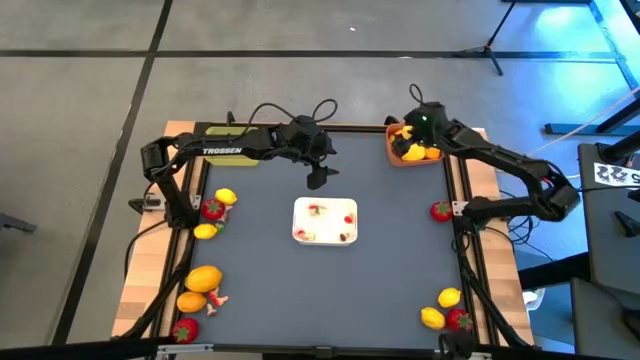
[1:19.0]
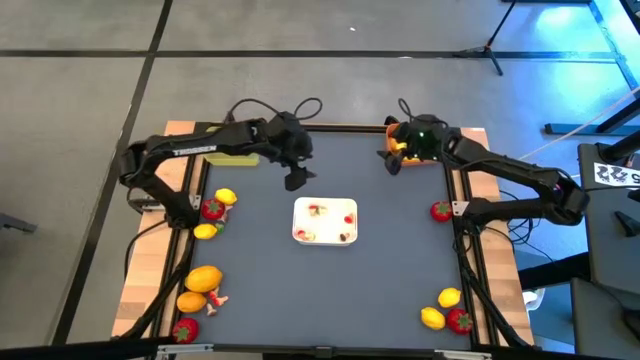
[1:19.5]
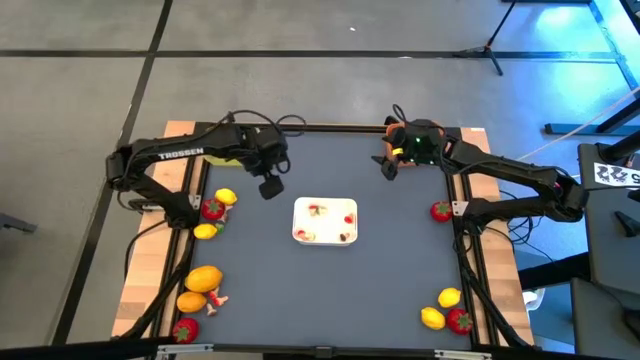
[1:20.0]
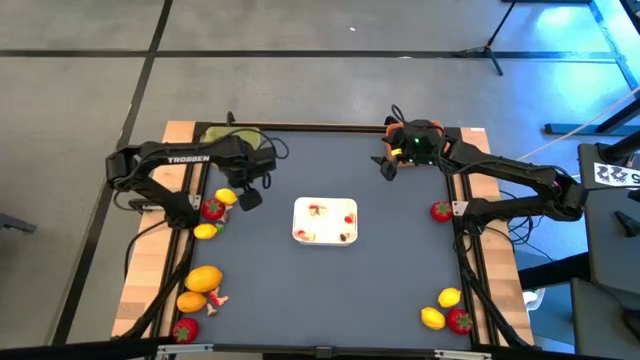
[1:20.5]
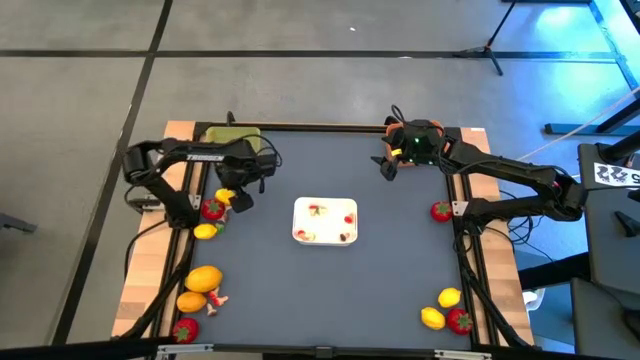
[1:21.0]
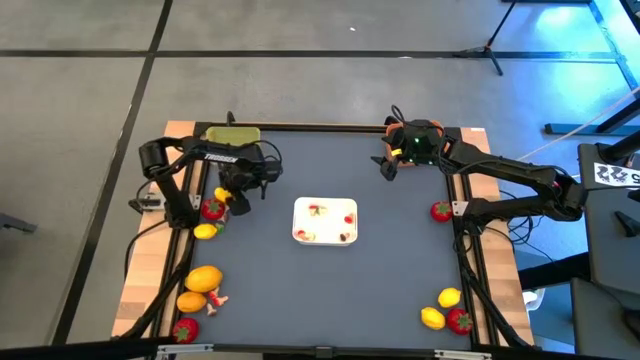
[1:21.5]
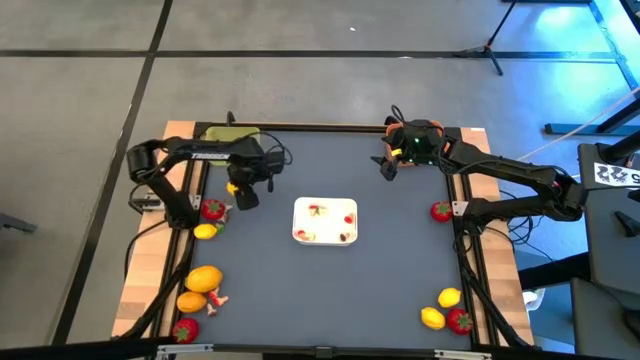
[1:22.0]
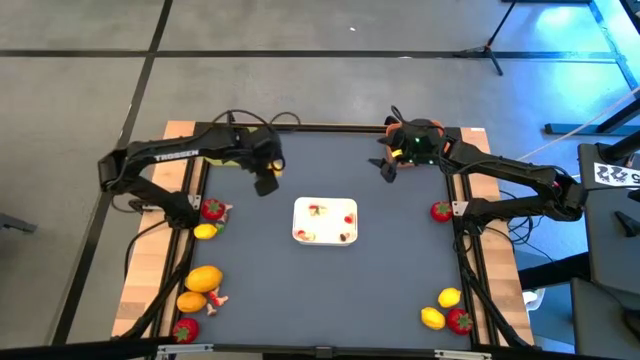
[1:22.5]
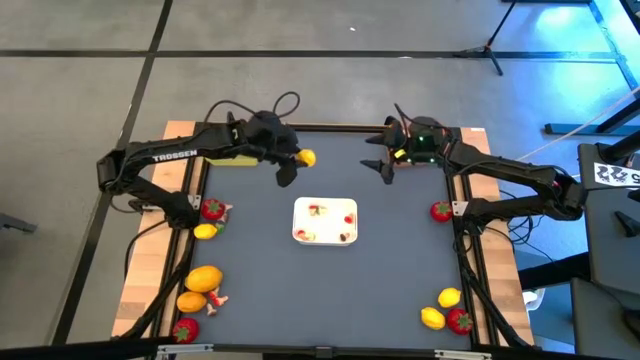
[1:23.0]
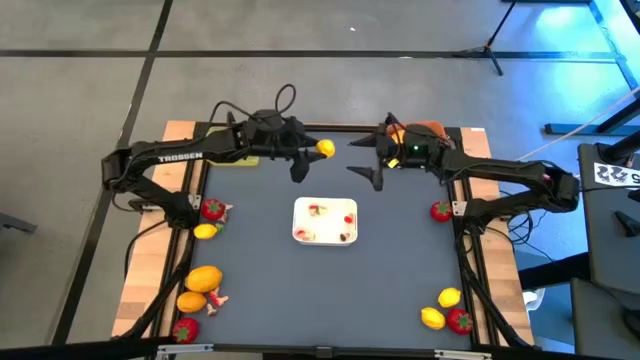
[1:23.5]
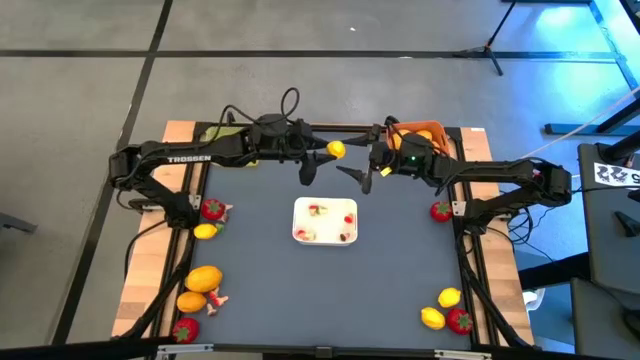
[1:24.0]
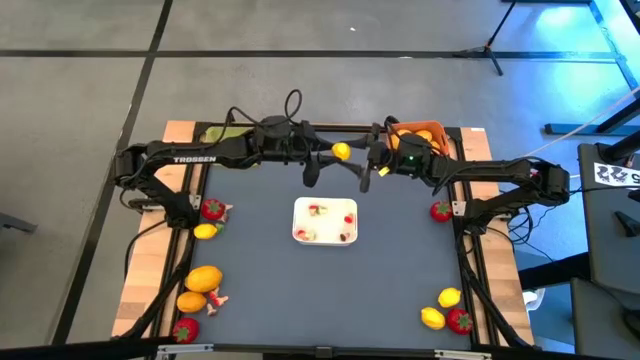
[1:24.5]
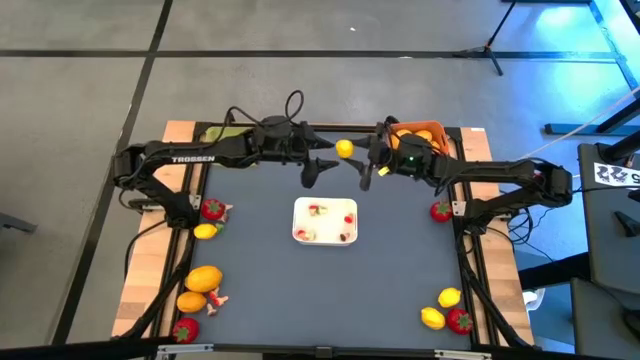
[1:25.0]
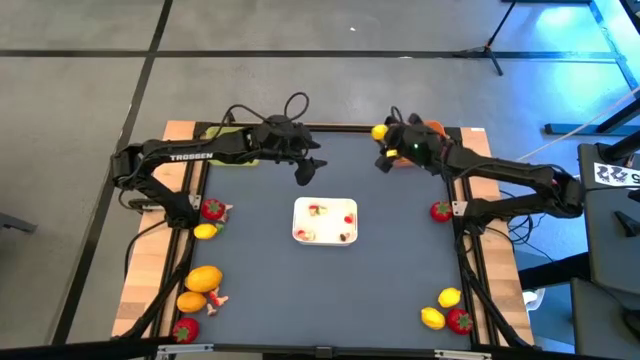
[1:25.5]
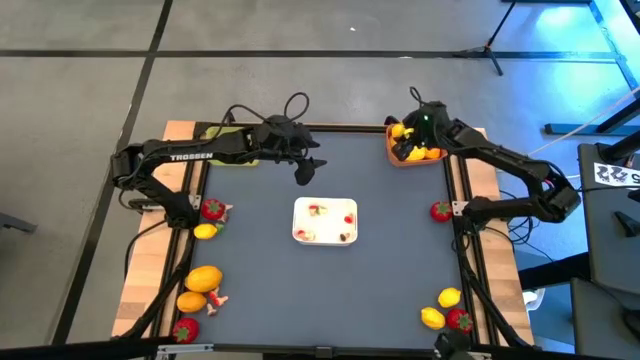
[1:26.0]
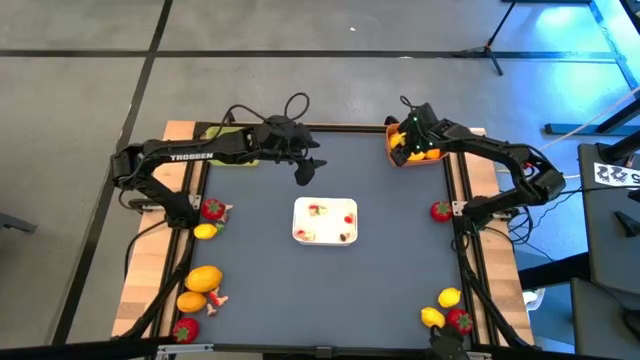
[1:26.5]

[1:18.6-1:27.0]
Task: Sort produce into baskets
Put the yellow lemon into the orange bin

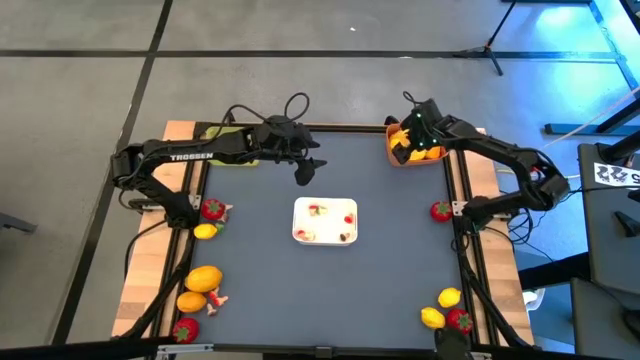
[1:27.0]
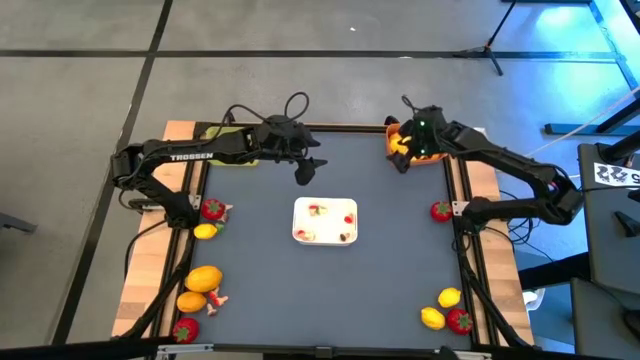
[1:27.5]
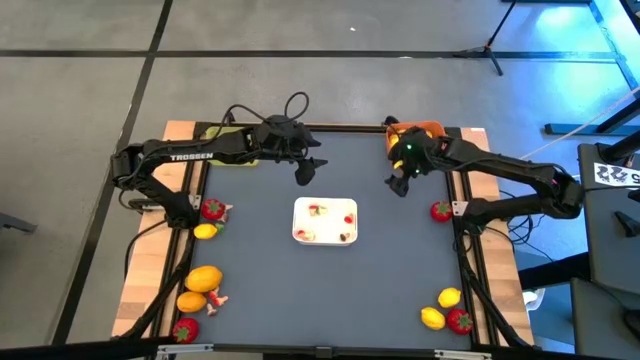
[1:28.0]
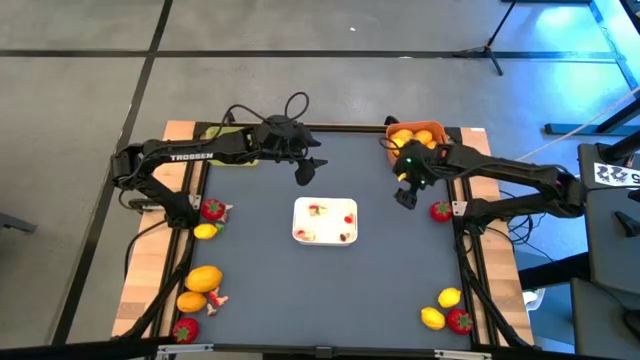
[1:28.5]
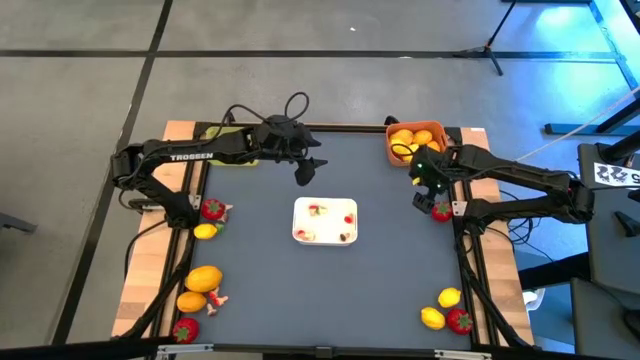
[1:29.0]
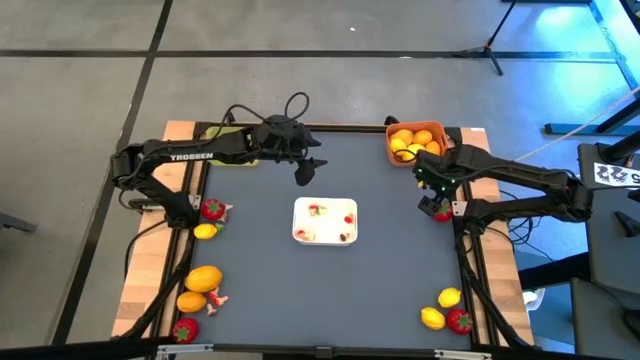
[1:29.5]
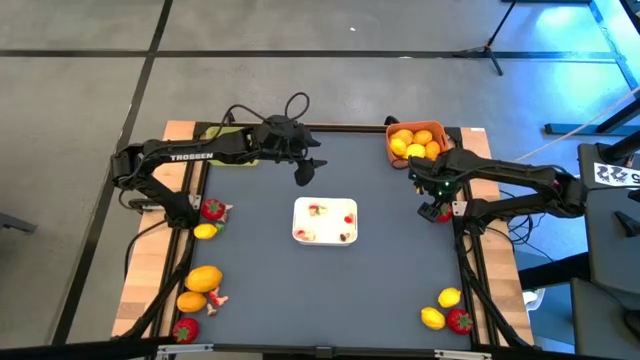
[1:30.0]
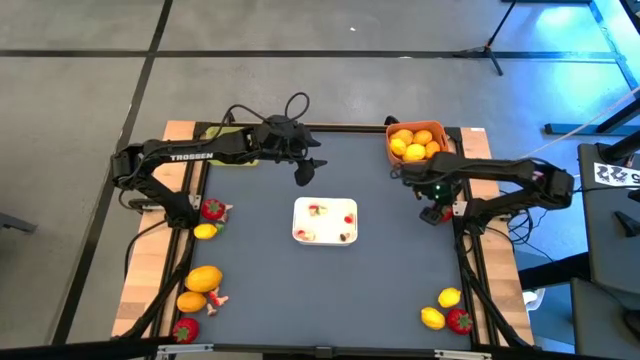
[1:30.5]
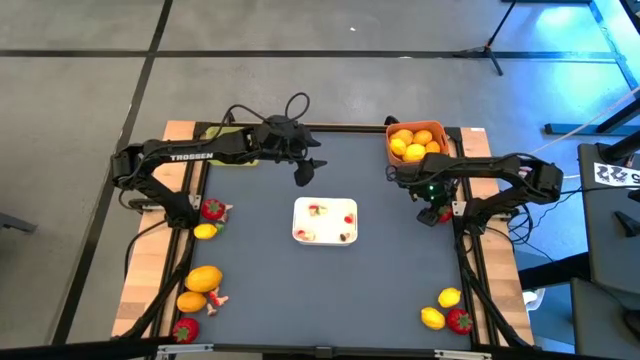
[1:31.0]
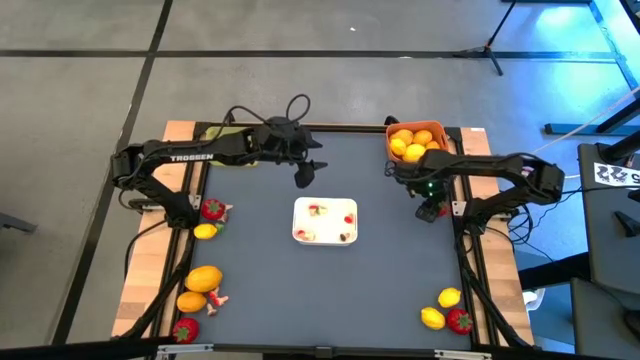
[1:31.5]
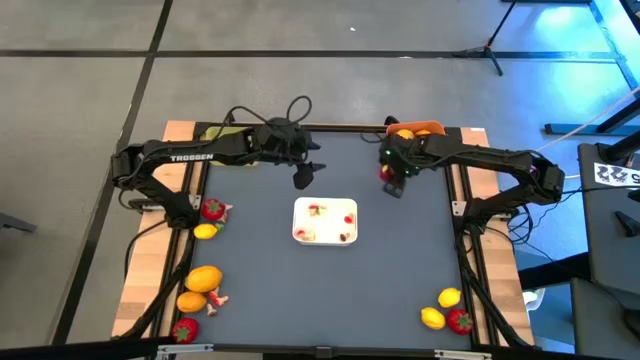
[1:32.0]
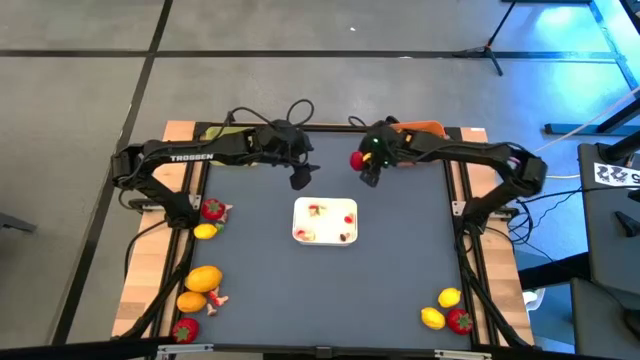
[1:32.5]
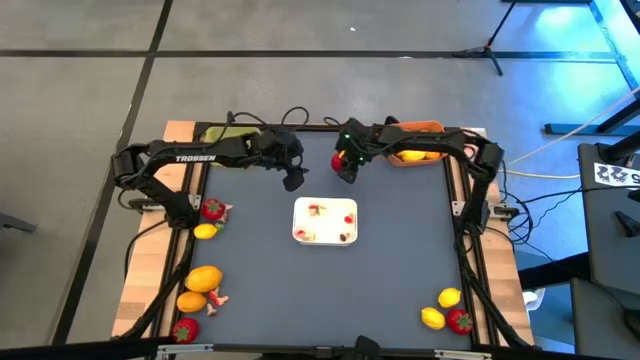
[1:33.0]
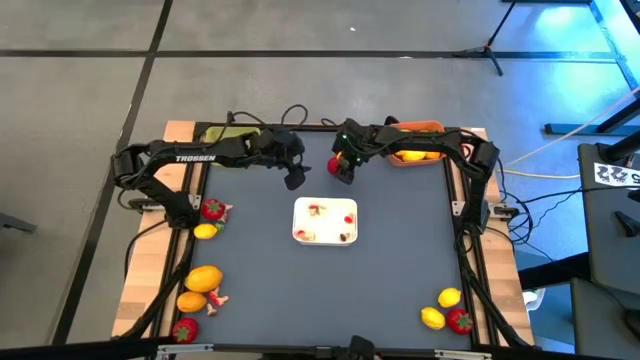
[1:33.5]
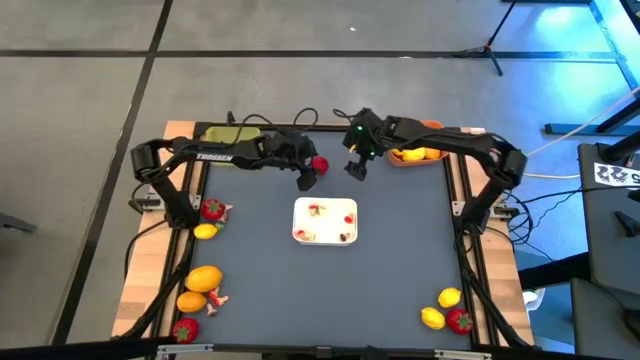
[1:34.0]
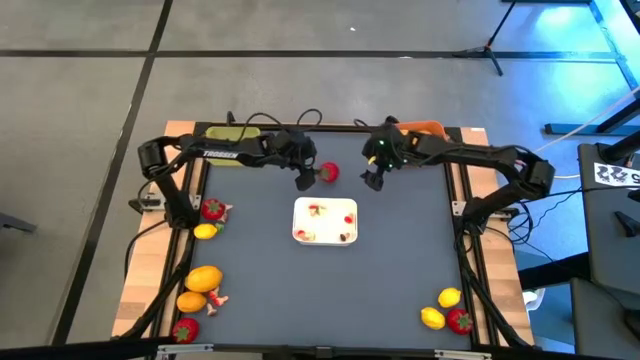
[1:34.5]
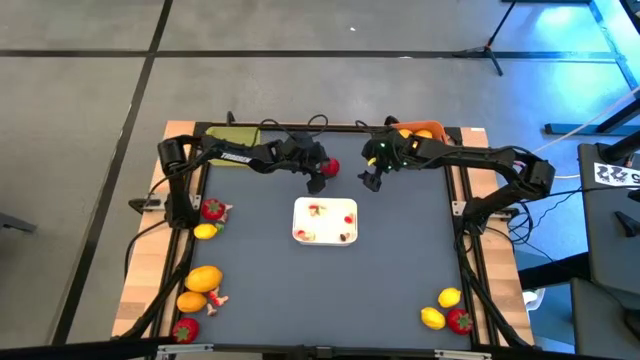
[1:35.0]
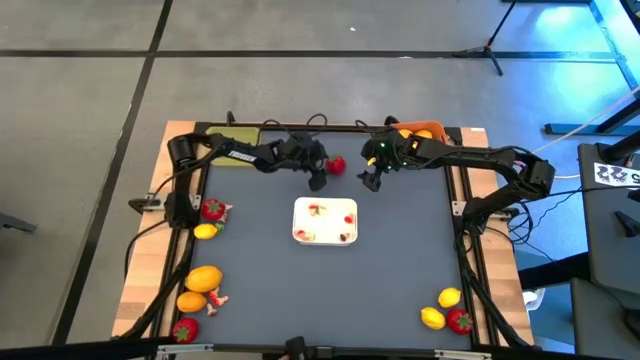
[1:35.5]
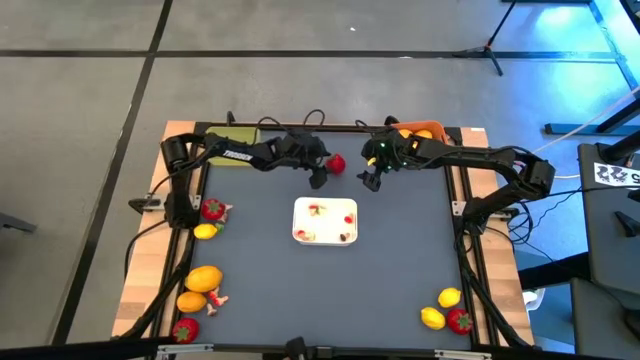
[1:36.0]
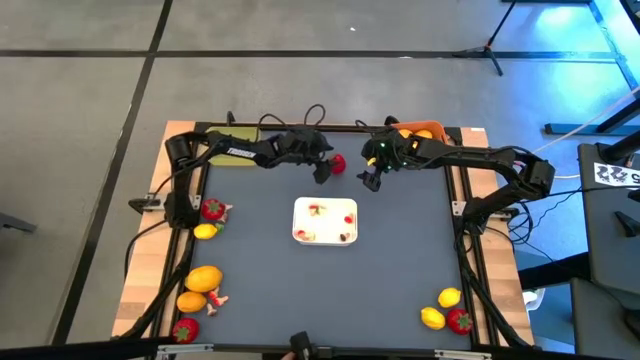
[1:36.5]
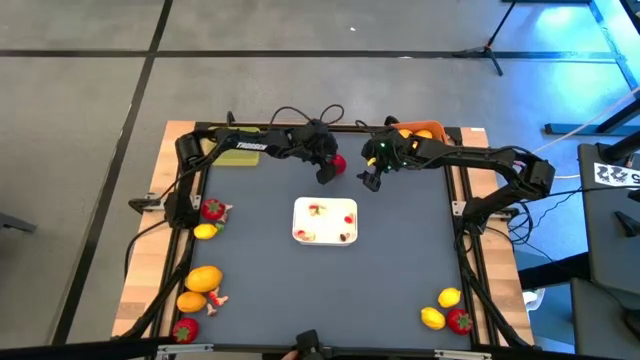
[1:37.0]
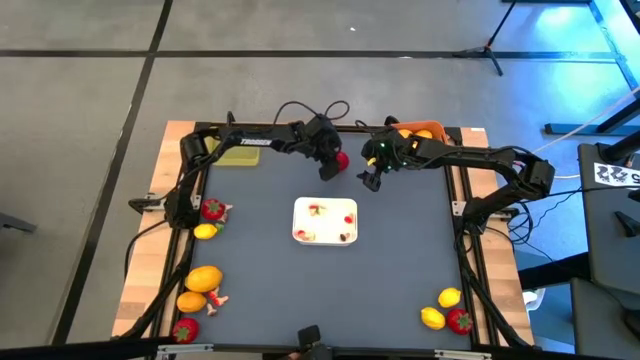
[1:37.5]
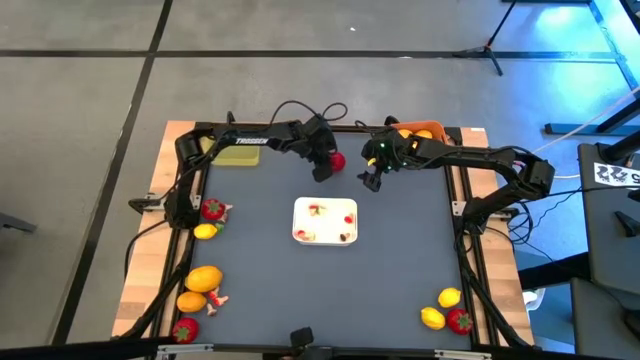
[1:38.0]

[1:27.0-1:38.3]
Put the red tomato into the yellow bin

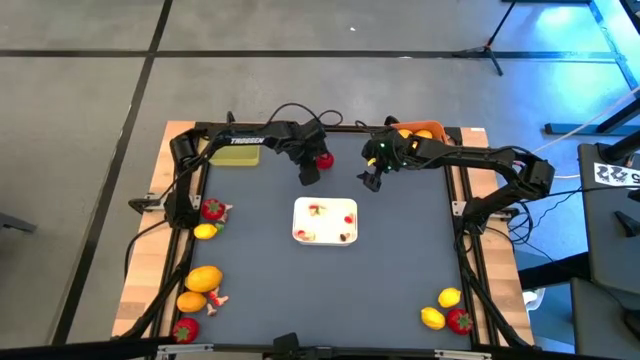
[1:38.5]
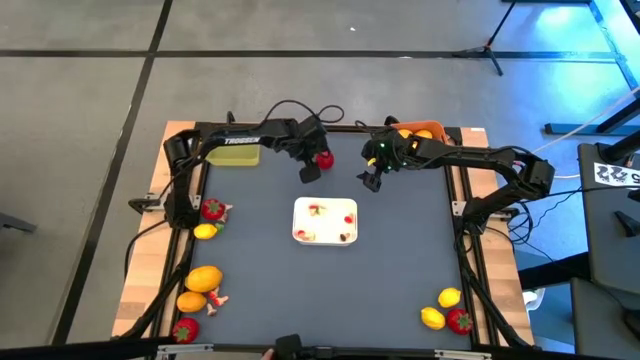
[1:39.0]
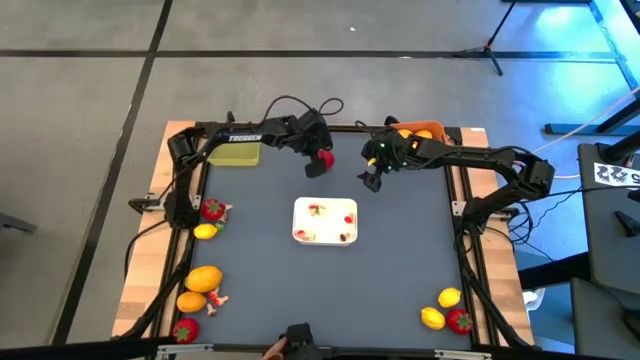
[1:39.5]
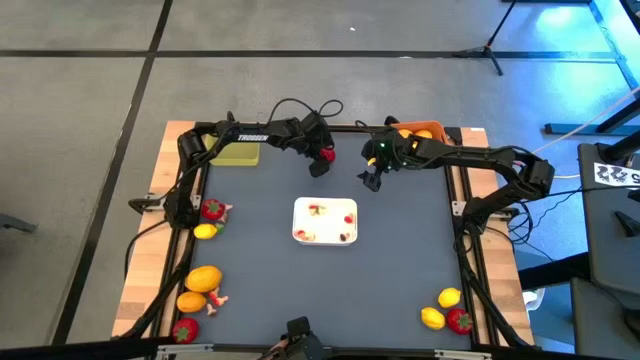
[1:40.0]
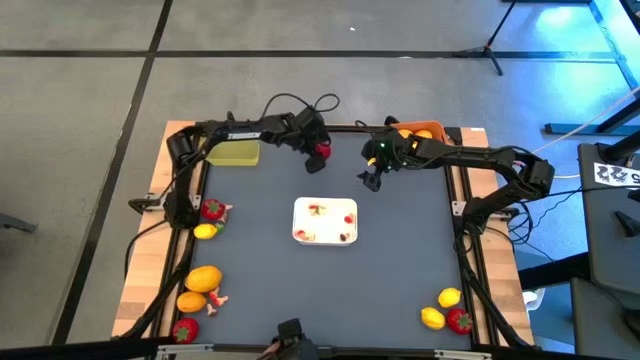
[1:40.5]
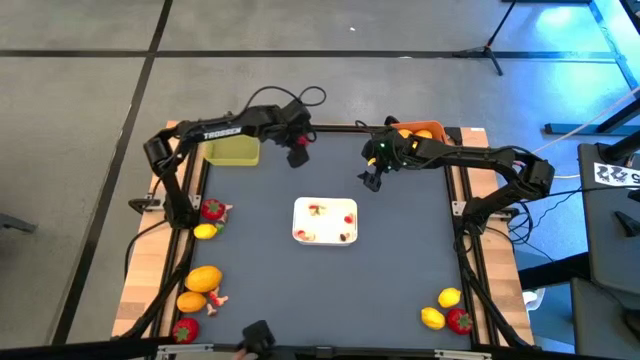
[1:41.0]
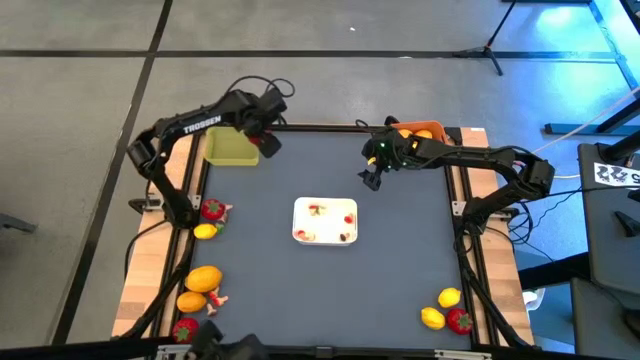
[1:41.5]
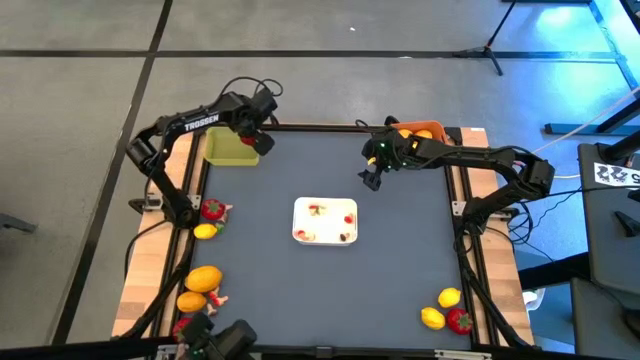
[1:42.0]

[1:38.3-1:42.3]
Put the red tomato into the yellow bin
